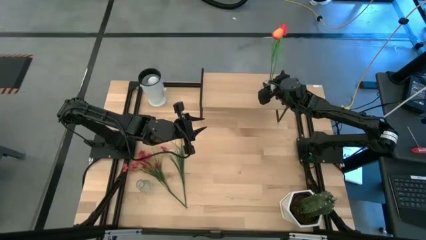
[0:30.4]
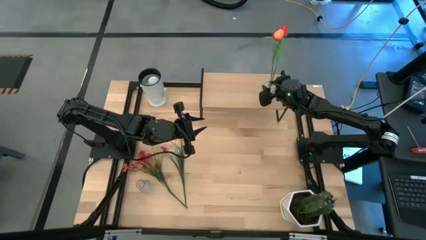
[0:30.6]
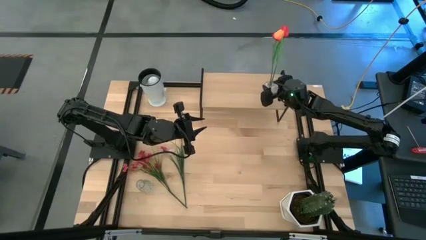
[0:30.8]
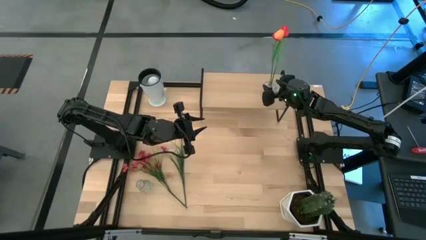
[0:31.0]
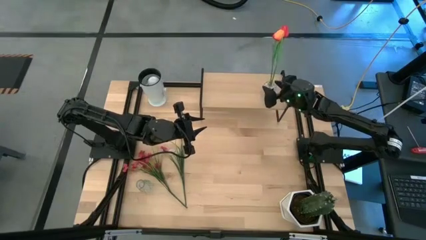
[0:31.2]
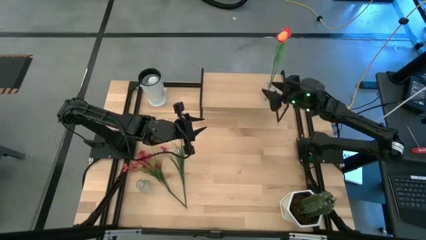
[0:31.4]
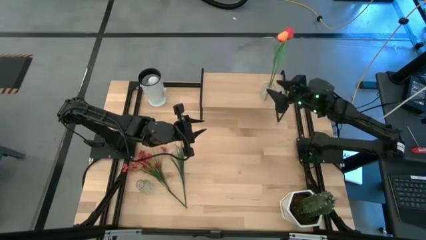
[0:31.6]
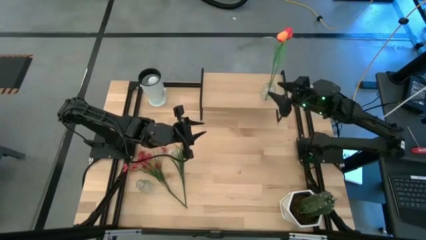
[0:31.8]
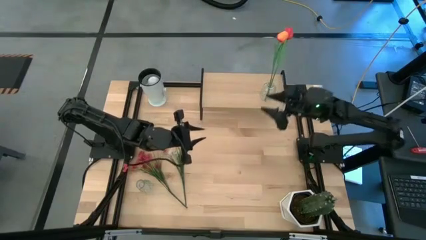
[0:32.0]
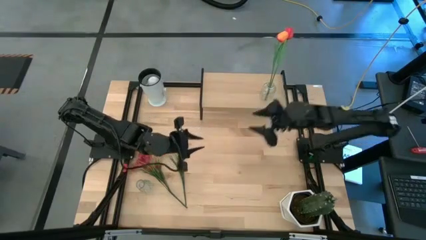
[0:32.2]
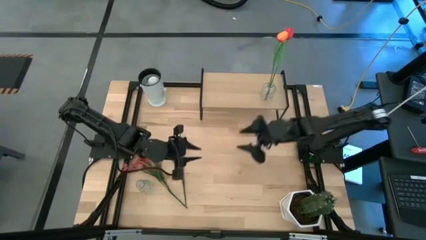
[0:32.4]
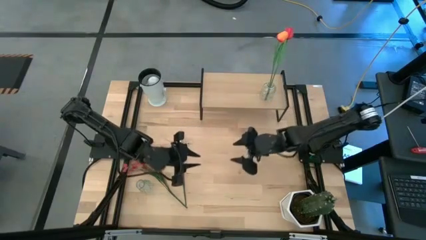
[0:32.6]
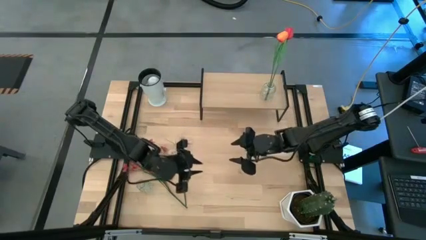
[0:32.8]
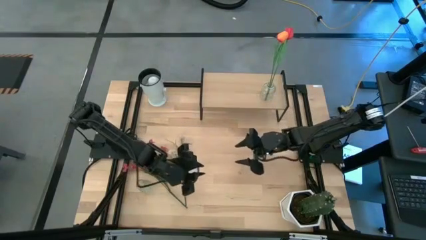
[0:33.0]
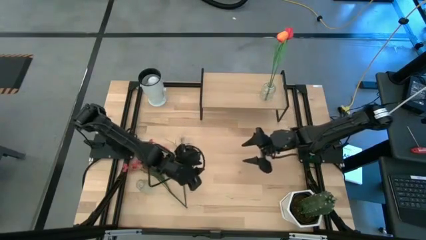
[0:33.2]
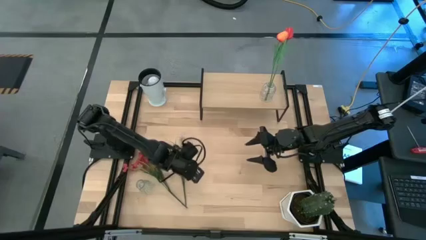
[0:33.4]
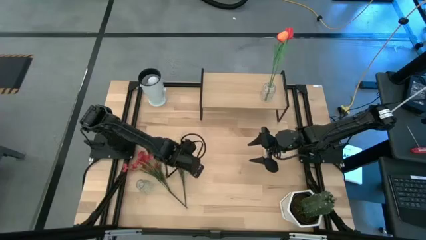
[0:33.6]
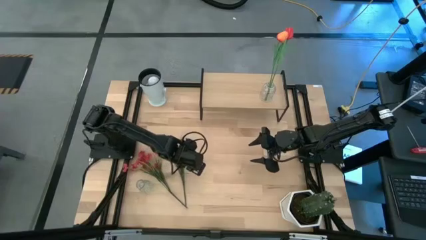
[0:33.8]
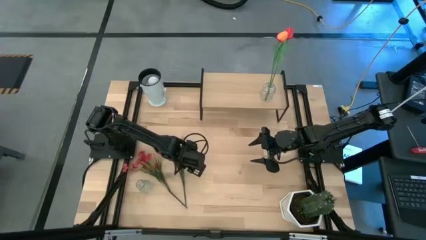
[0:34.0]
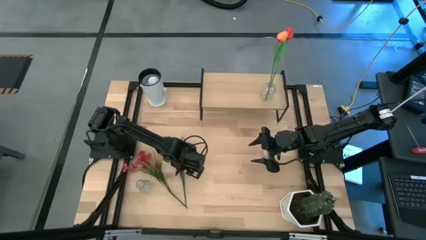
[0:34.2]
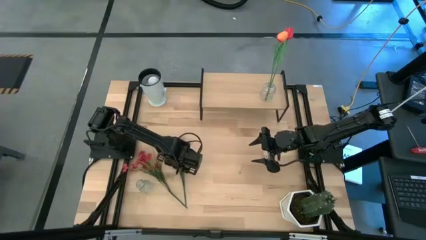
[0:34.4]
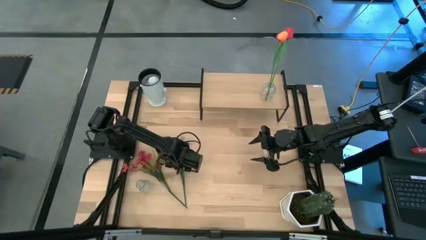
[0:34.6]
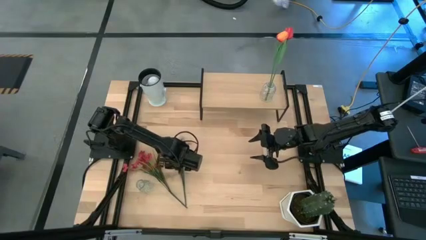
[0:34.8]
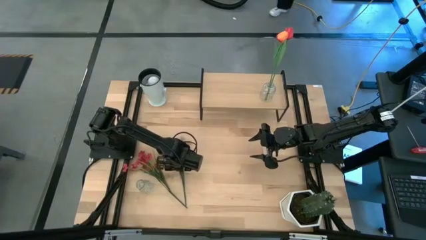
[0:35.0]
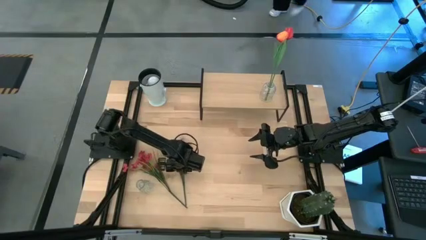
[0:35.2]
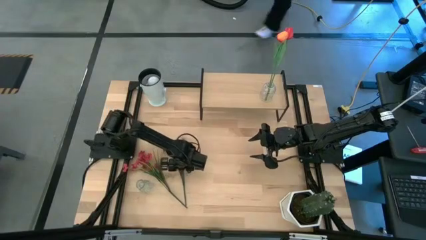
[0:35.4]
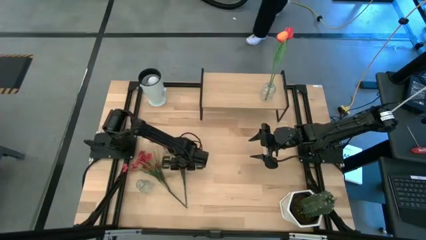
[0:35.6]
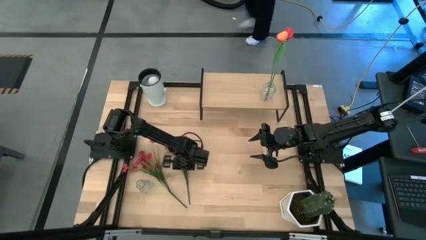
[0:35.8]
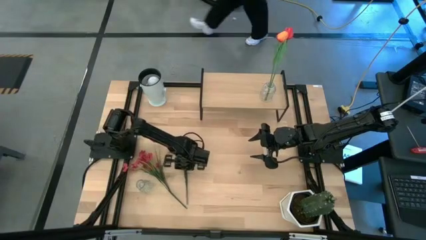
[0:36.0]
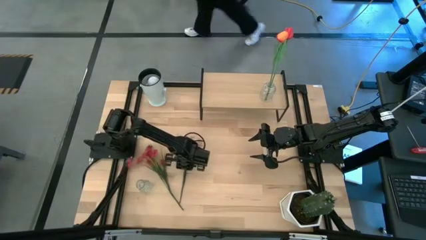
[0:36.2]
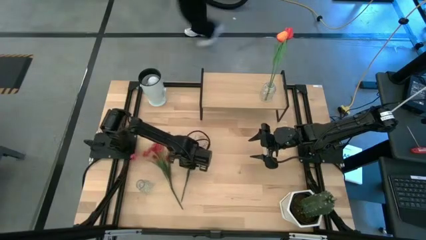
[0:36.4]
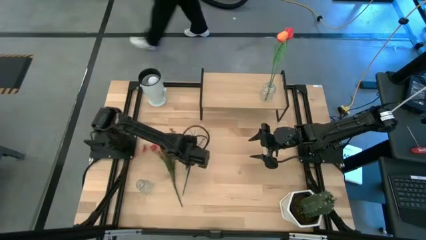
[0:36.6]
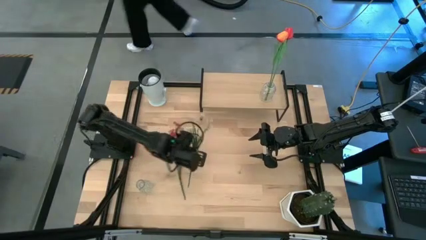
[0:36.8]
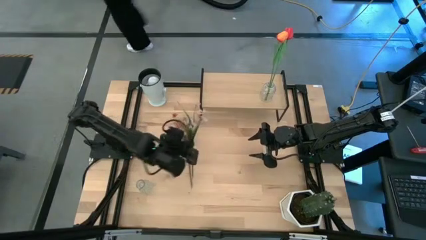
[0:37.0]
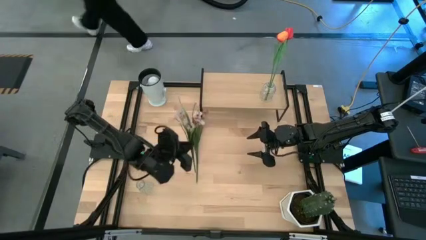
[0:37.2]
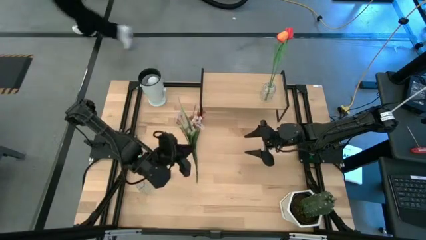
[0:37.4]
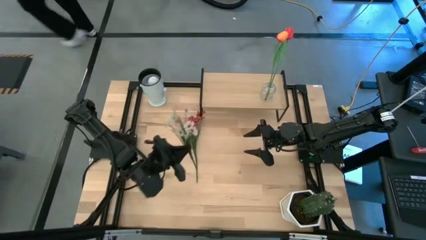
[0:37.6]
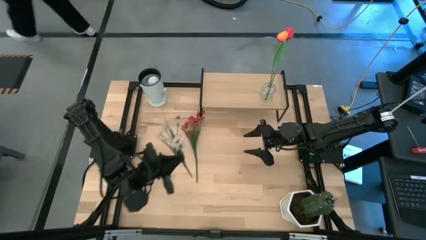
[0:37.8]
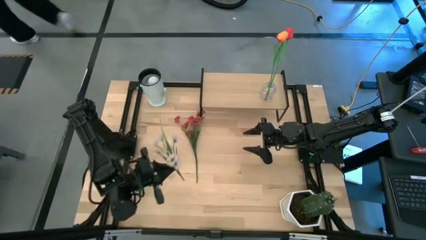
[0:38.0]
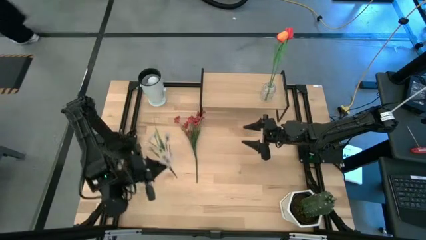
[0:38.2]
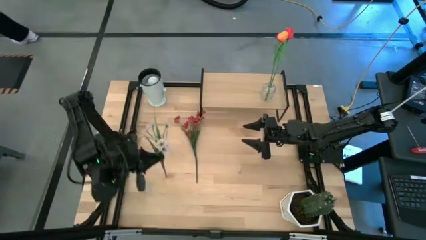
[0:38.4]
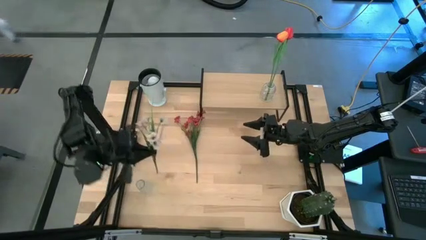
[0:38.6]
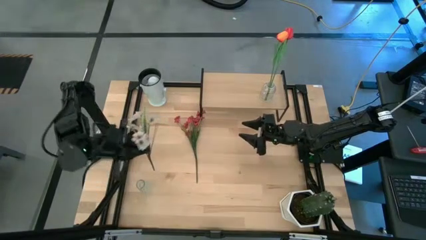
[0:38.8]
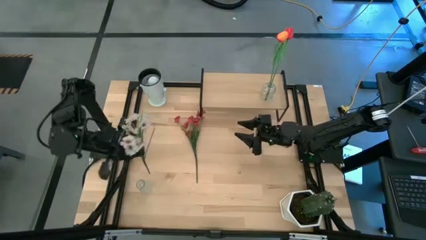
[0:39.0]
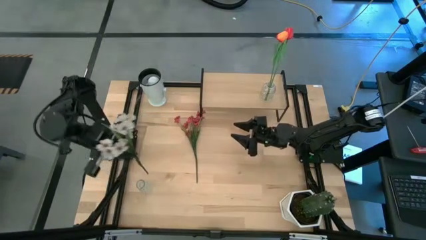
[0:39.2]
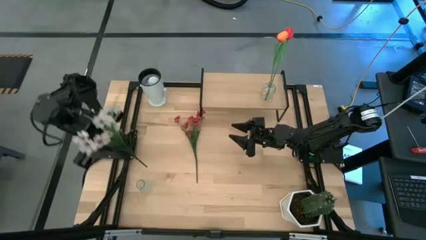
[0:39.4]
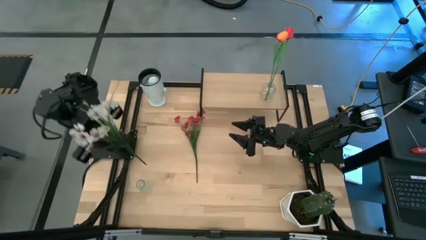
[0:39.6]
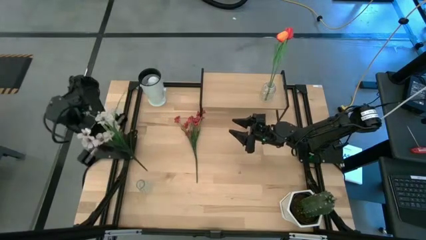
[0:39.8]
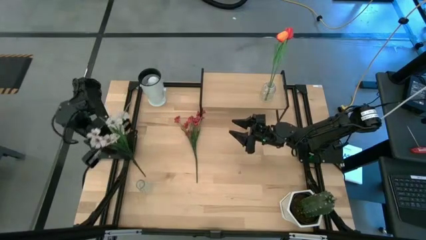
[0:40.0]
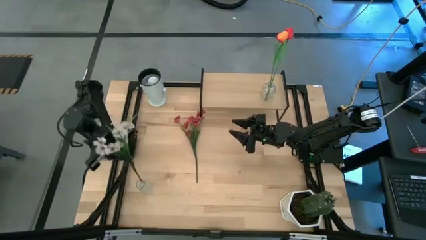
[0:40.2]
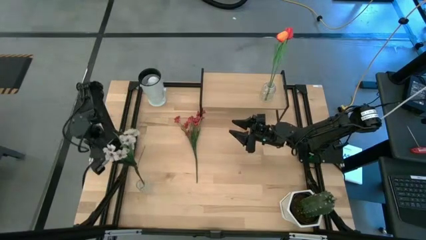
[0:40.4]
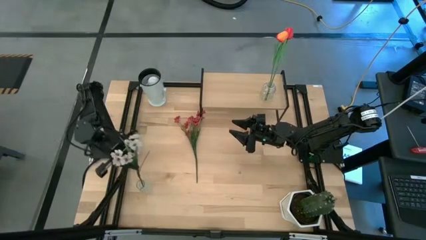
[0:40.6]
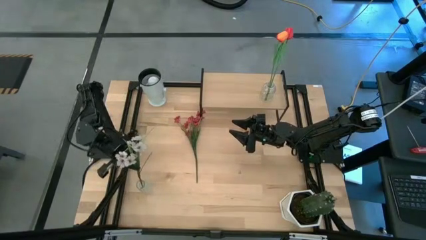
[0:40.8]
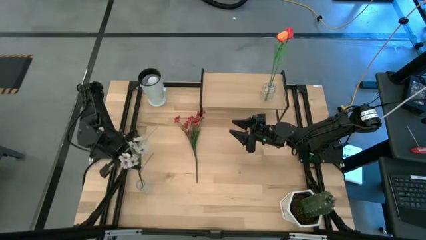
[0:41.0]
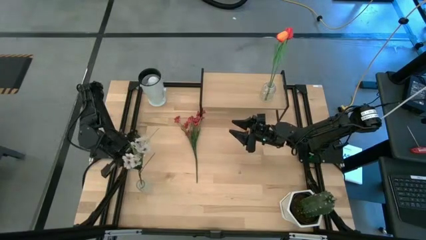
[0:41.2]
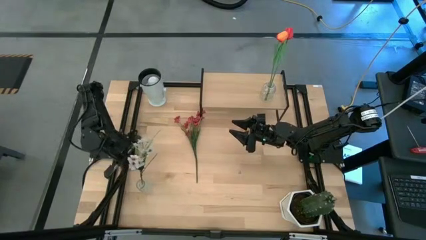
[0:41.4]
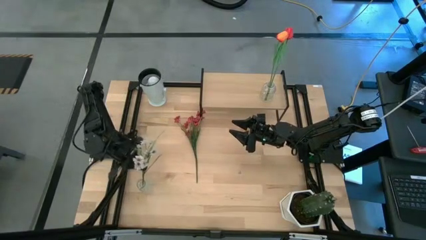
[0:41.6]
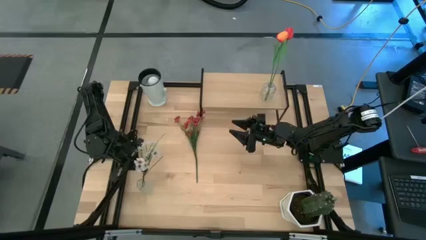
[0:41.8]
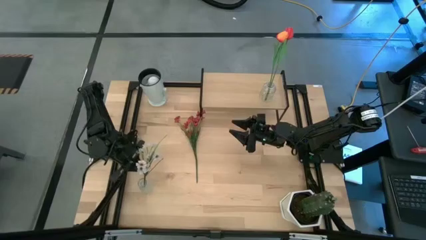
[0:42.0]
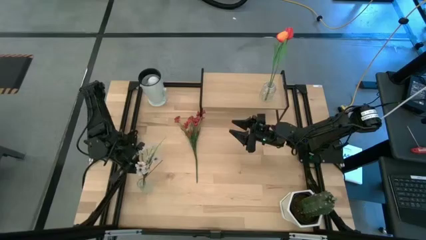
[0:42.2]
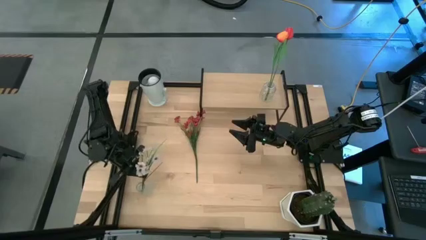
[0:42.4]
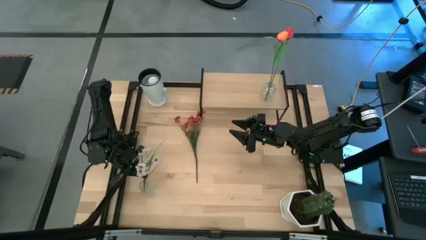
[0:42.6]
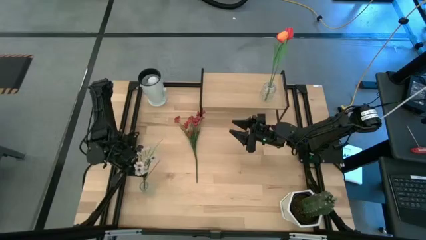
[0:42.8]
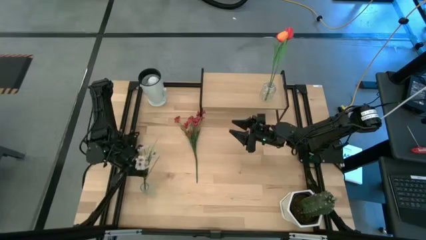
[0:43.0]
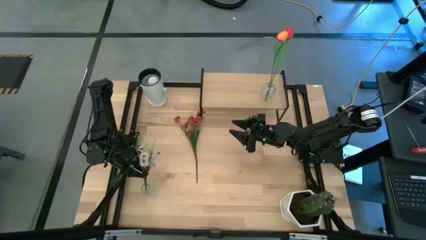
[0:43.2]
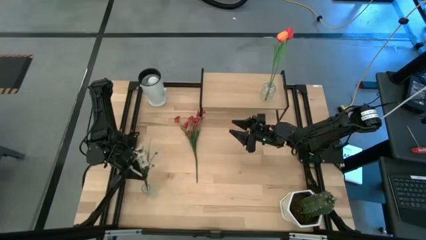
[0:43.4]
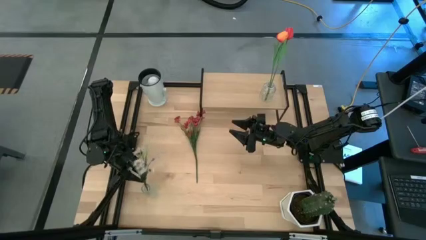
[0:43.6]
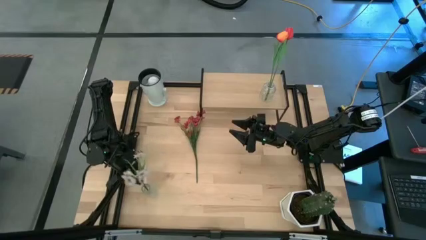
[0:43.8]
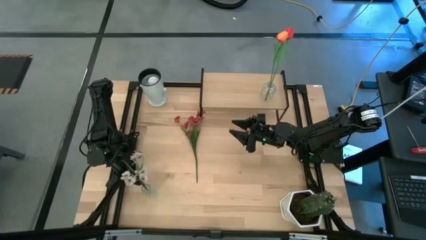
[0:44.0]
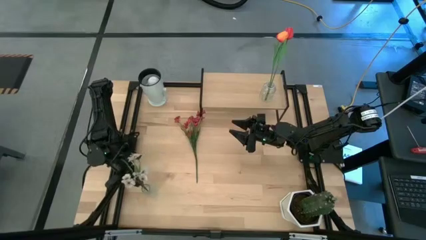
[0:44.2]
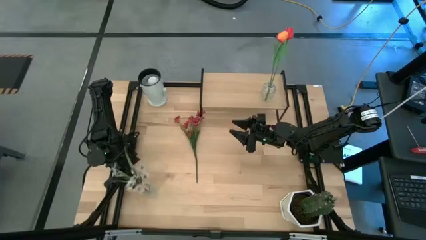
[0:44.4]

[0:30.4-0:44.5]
Task: Pick and place flowers into a vace then onto a shelf
Put the white flowers into the transparent vase

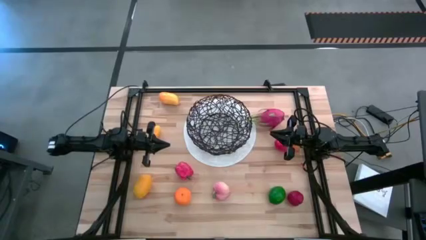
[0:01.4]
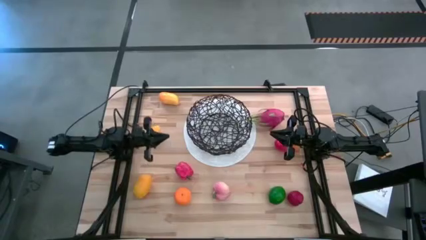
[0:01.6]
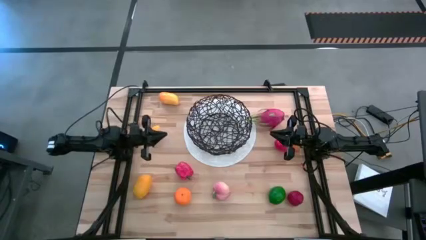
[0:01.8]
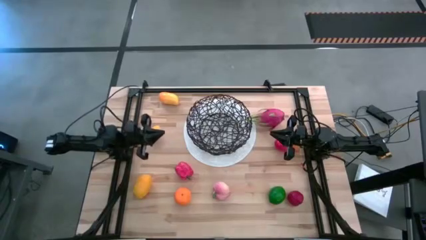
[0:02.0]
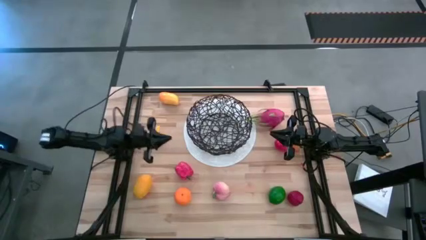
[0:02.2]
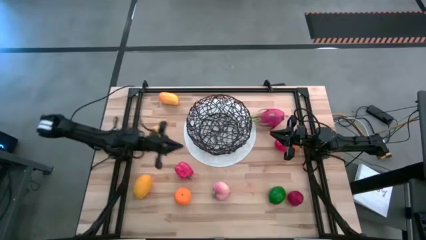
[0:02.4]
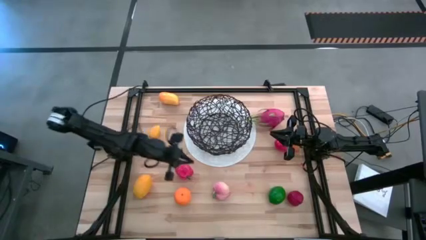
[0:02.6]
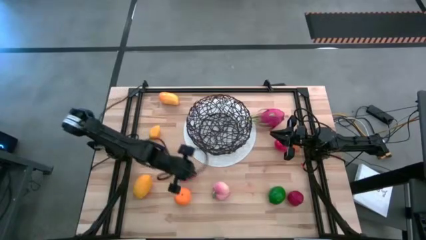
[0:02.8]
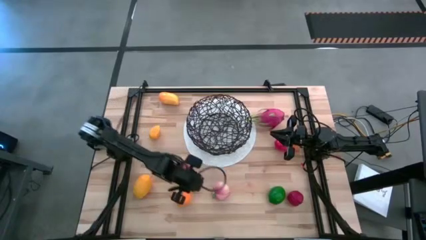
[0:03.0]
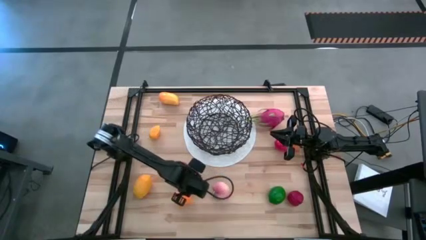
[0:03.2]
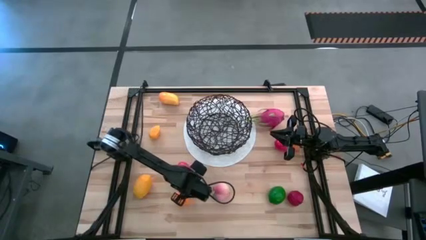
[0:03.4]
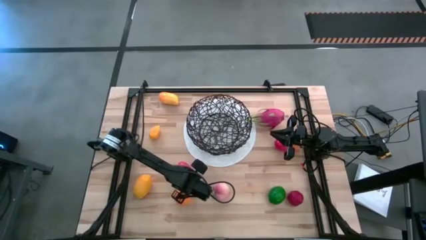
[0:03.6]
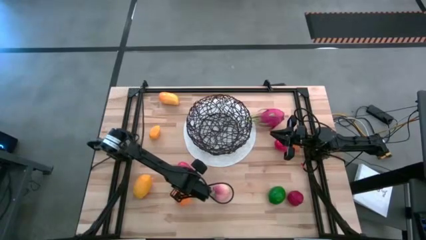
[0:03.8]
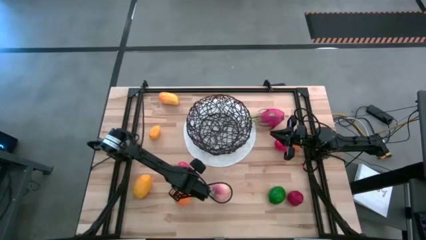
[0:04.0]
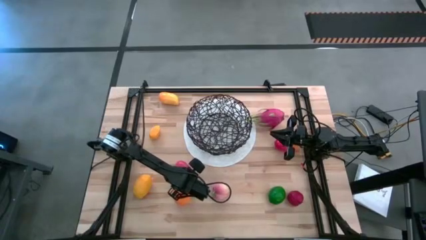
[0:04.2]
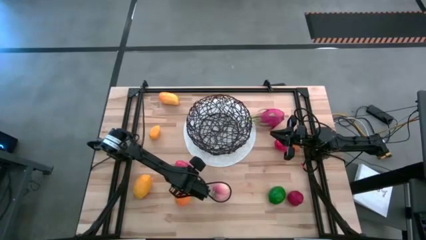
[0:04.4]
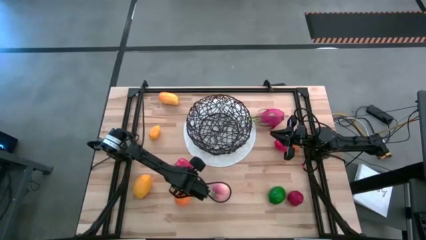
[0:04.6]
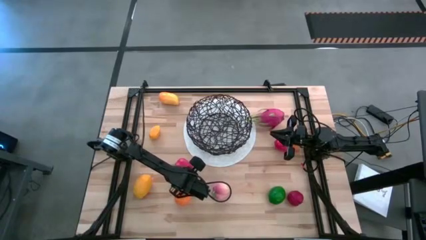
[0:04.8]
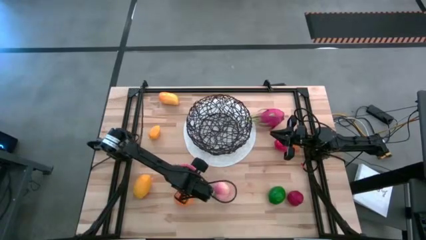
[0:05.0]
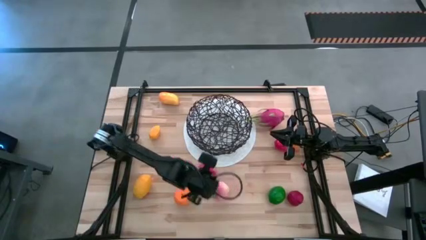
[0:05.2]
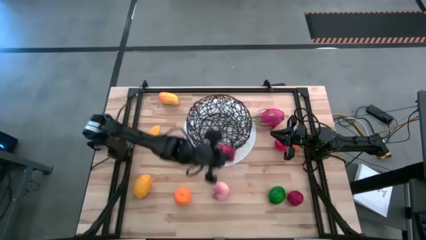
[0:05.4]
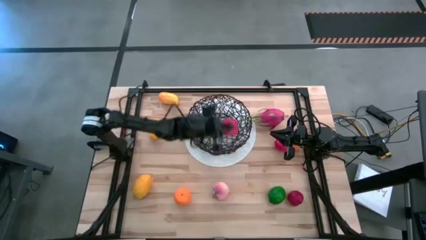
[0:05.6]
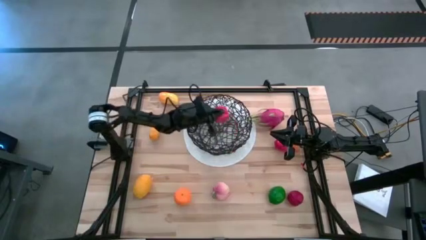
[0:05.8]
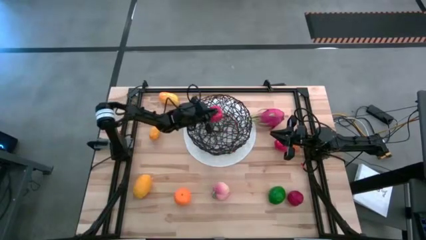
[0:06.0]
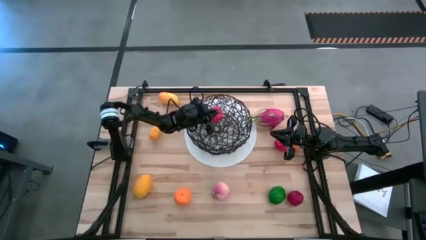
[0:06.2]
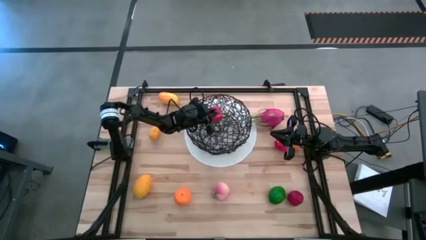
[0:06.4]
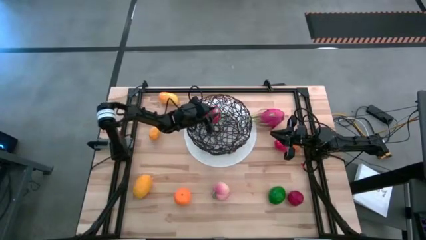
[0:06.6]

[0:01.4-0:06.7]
Task: Build produce basket
Put the red bell pepper into the wire basket
